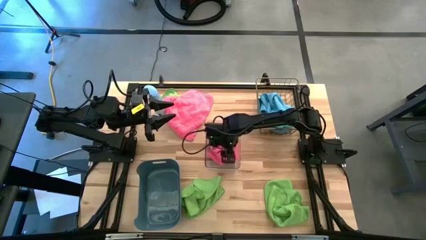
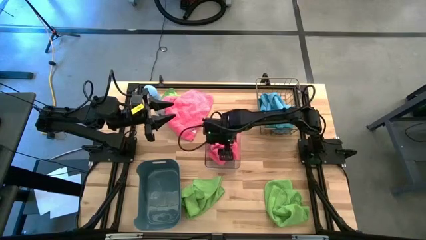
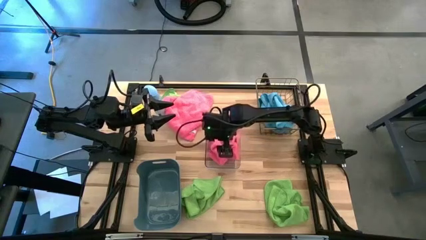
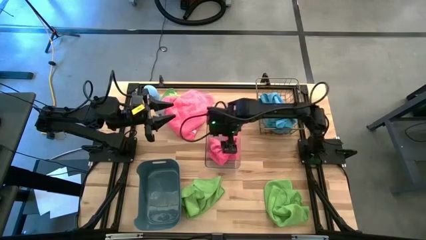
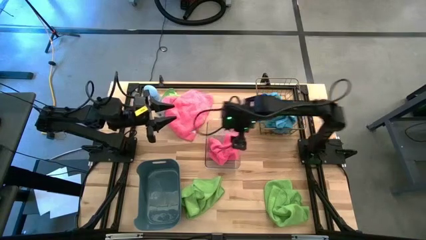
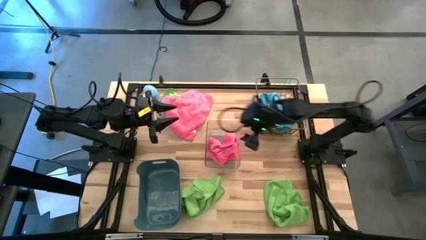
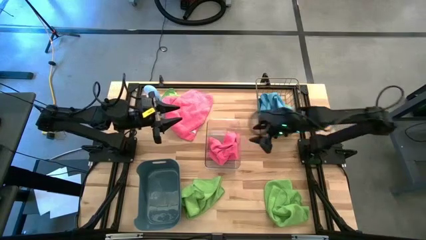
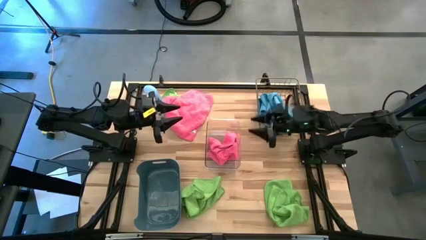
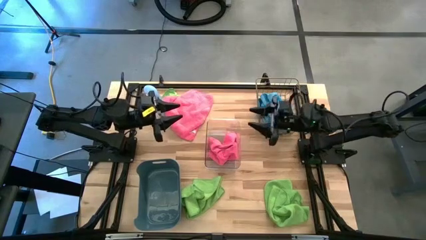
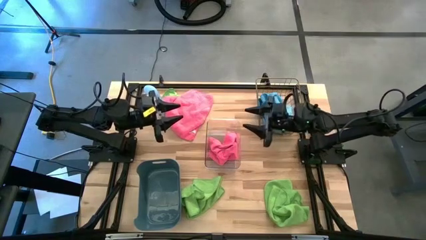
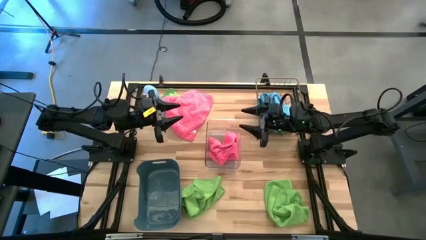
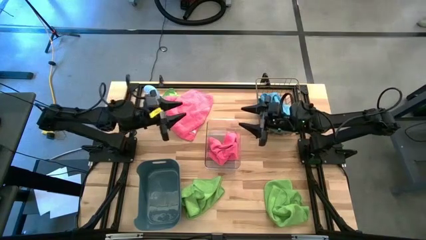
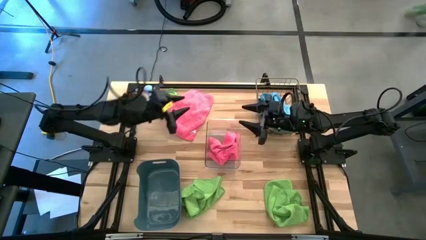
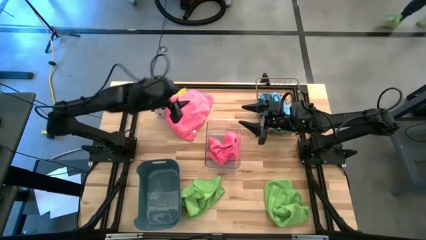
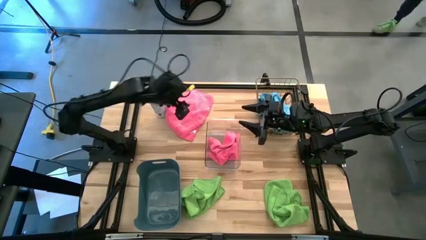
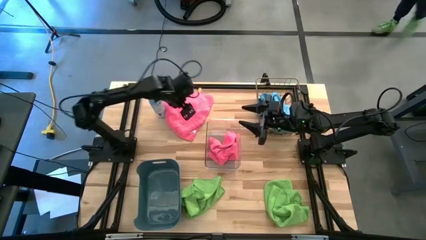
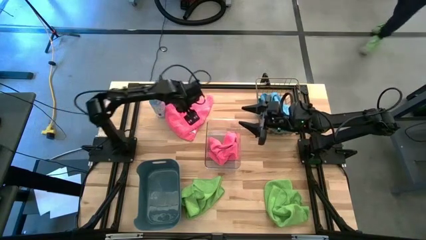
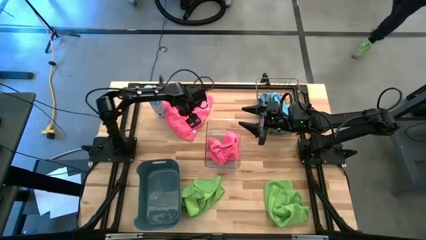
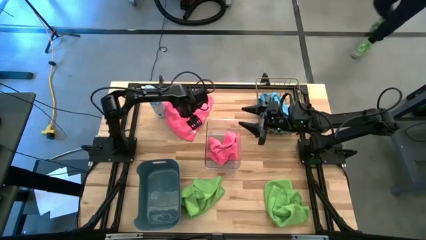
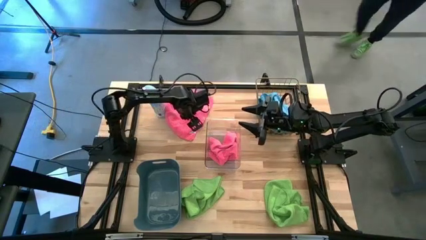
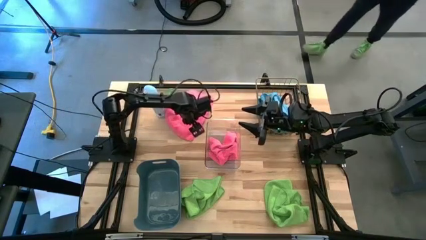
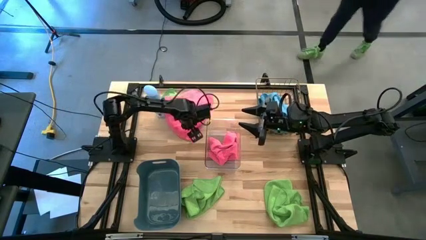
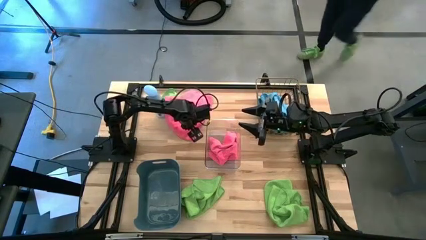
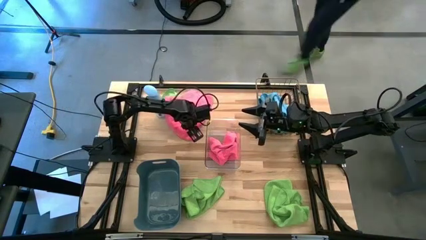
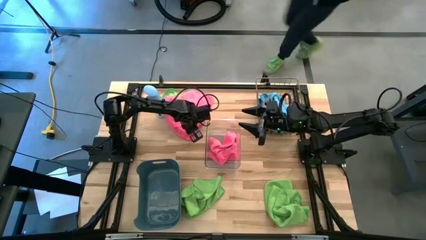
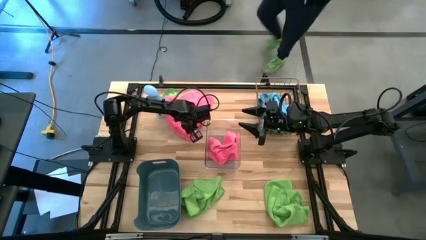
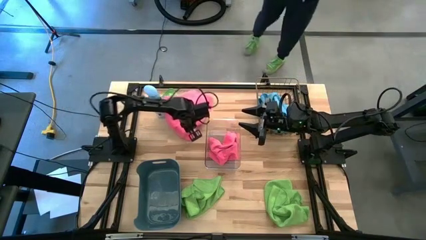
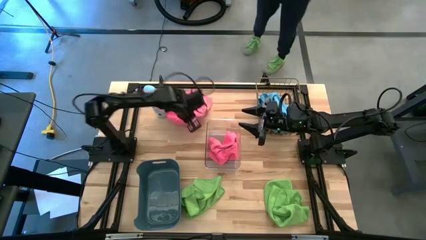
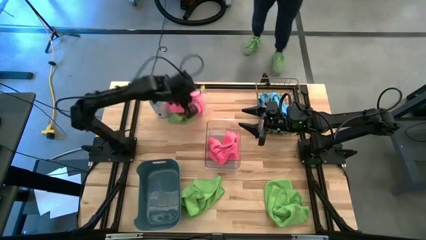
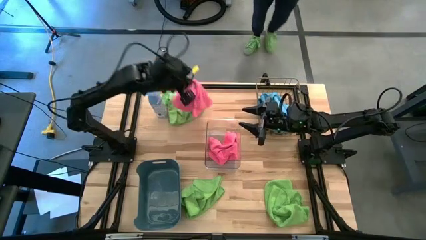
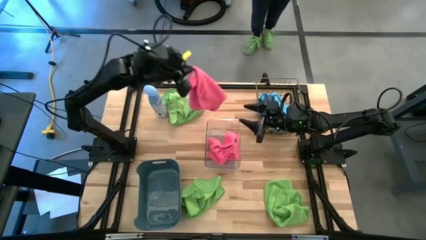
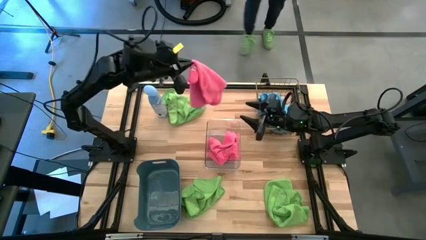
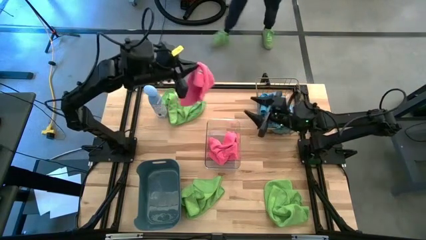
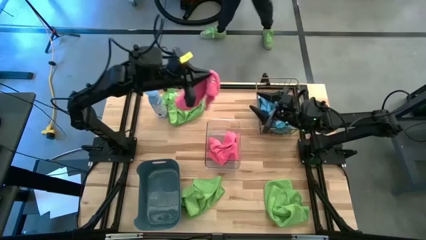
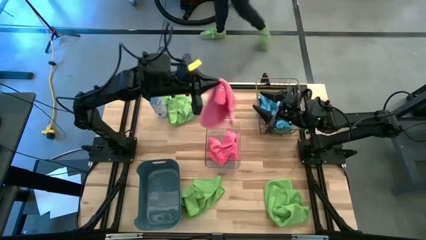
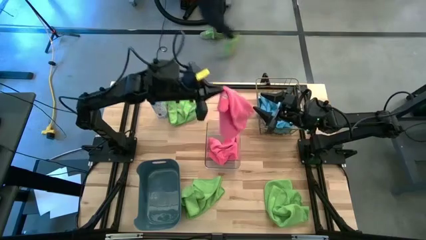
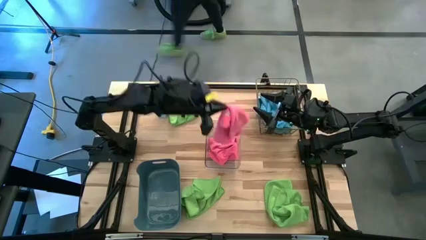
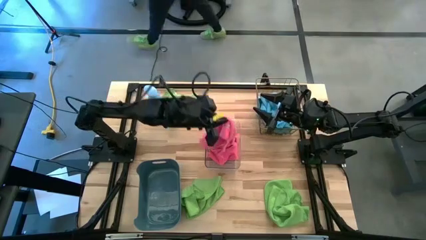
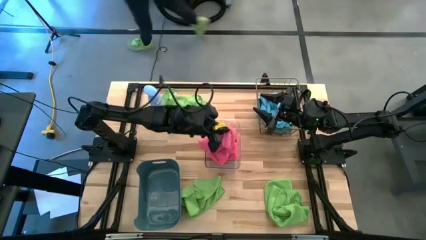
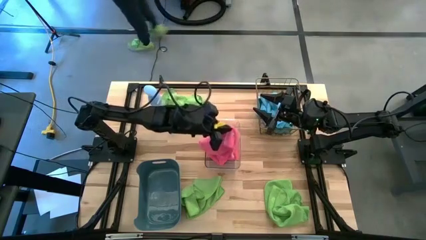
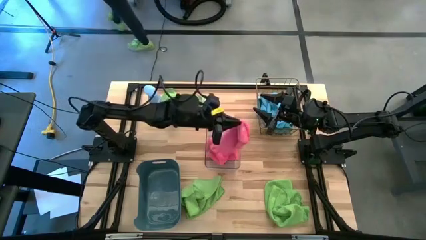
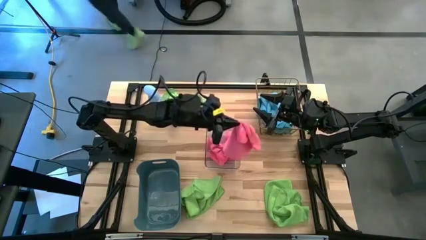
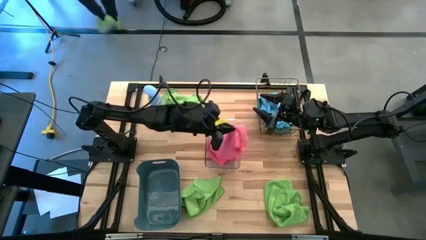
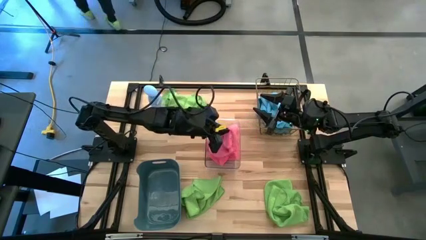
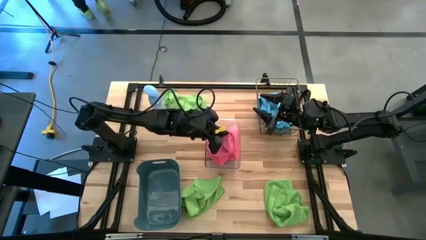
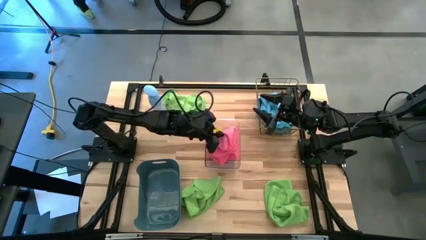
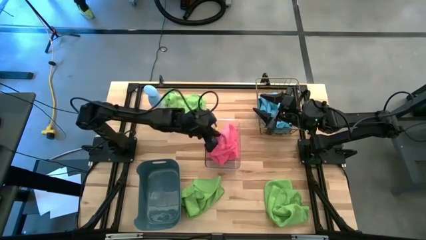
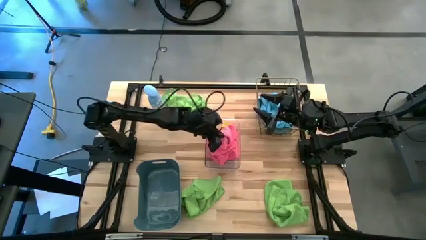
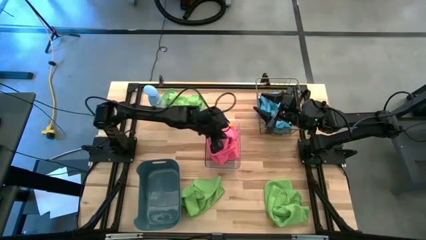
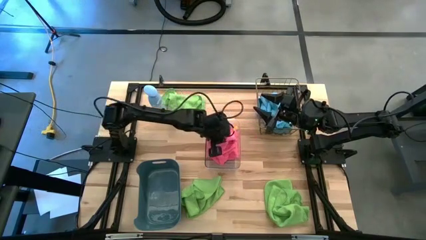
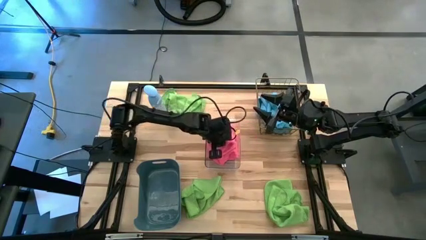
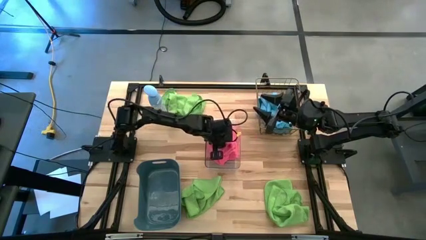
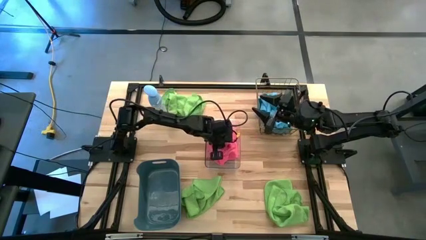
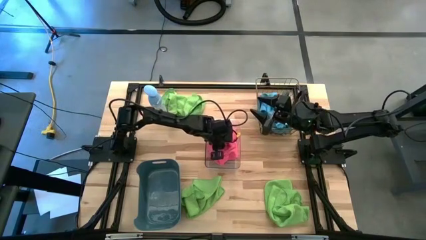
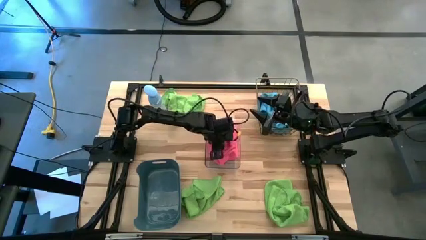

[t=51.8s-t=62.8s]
Task: Sort microfiber towel by color & place in baskets
Put the pink microfiber cloth into the transparent bin
